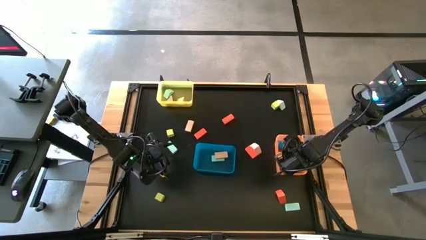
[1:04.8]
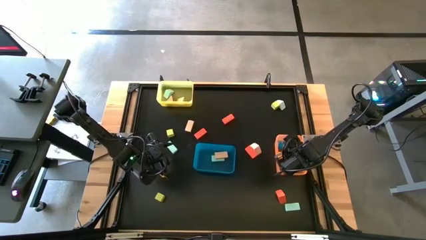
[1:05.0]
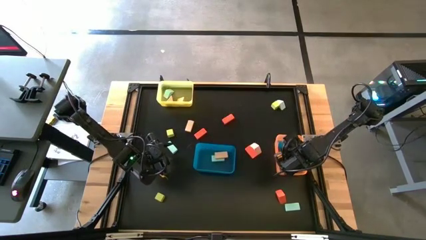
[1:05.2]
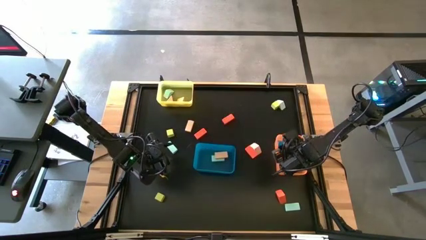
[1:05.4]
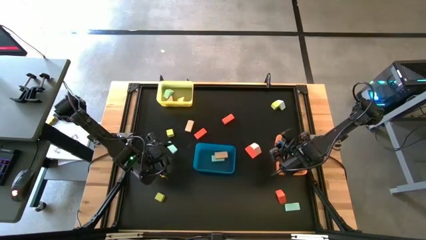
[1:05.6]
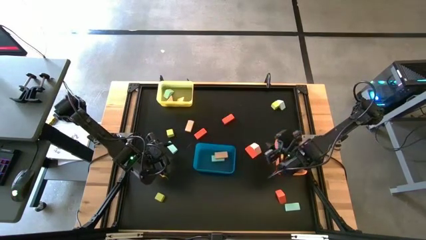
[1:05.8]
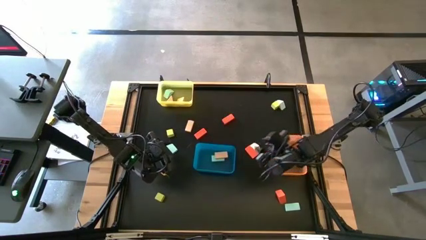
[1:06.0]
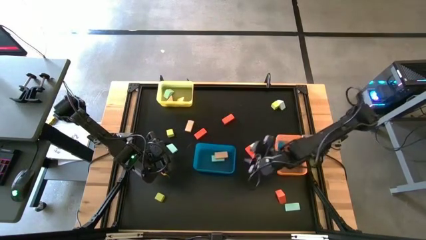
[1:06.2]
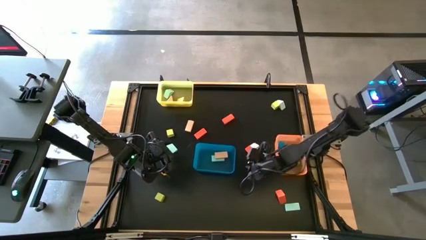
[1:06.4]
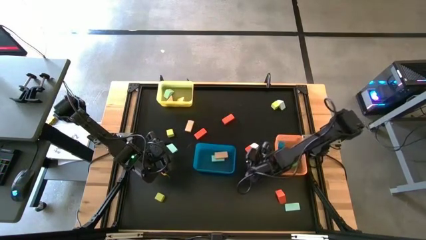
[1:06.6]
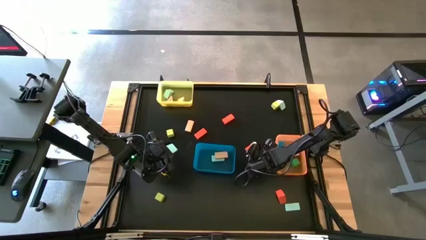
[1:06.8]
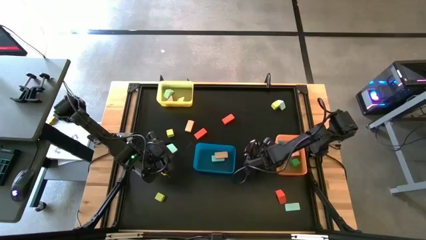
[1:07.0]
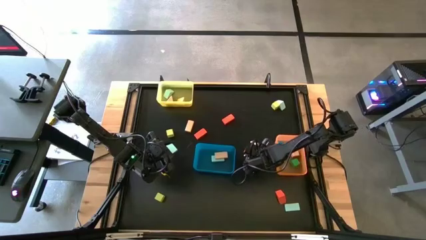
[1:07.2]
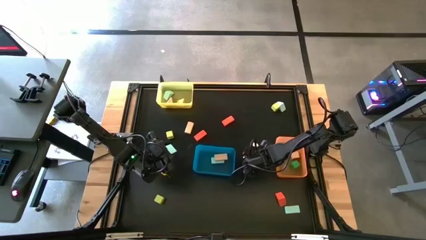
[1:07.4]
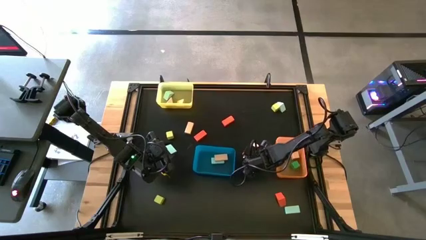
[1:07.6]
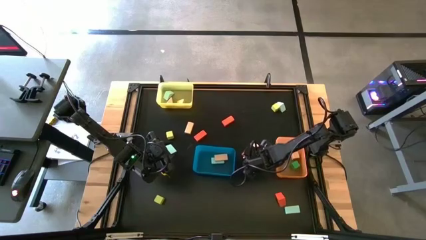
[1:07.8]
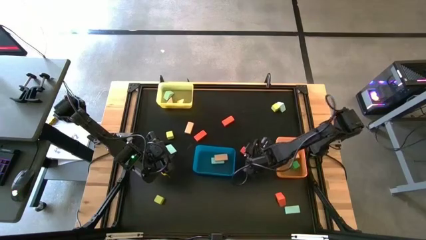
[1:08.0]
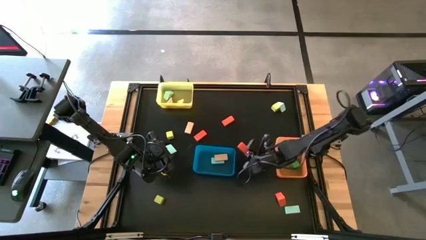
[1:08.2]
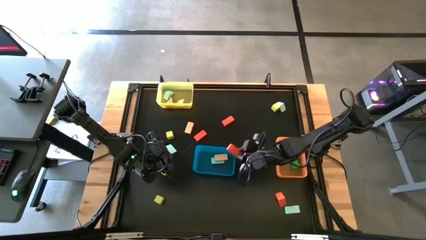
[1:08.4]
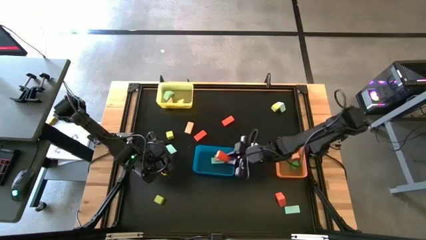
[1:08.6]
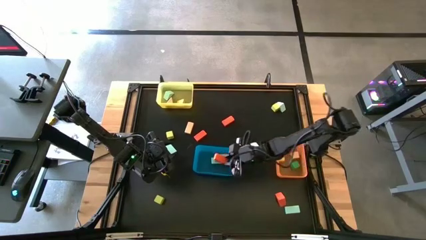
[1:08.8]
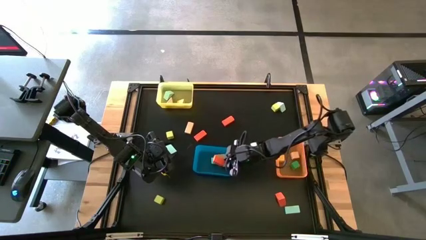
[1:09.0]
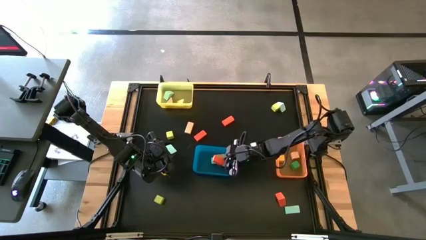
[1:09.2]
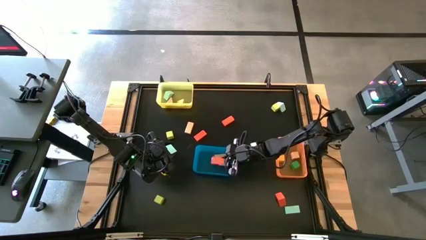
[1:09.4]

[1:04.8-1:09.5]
Task: Sort blocks by size
Put the orange rectangular block into the blue bin

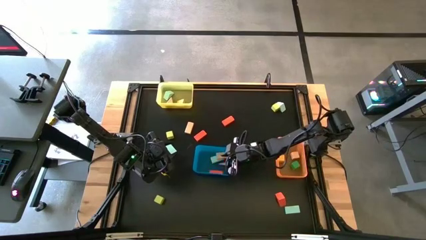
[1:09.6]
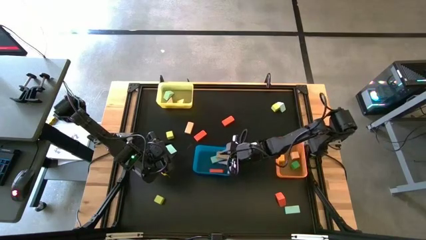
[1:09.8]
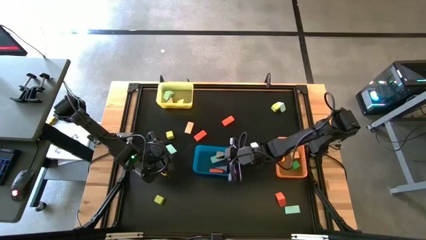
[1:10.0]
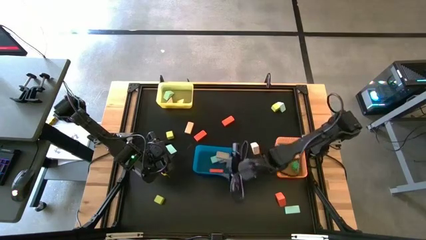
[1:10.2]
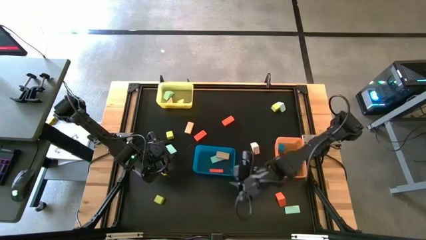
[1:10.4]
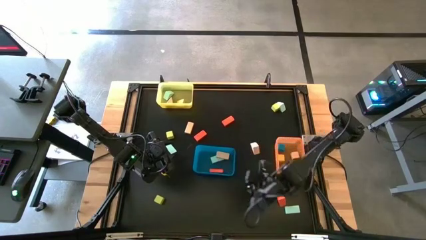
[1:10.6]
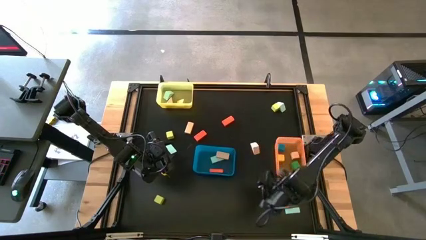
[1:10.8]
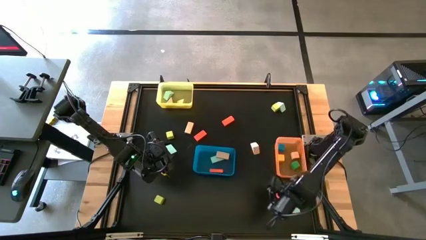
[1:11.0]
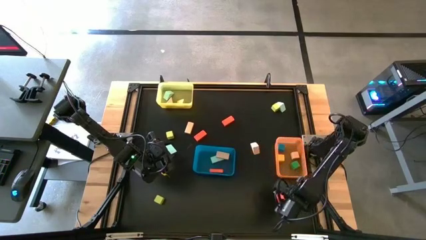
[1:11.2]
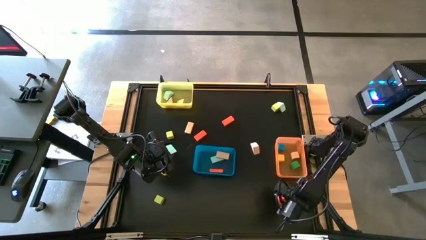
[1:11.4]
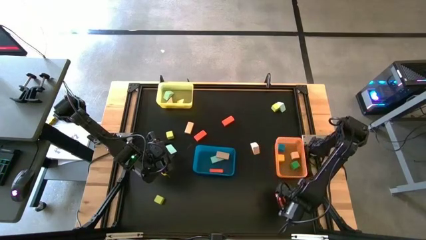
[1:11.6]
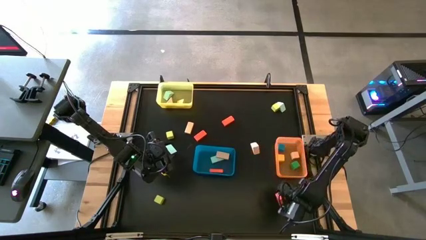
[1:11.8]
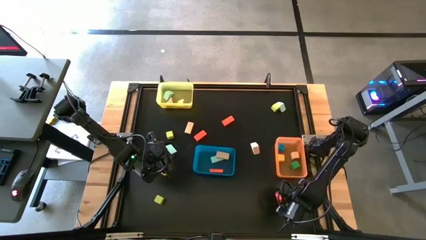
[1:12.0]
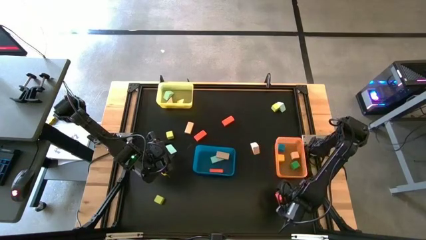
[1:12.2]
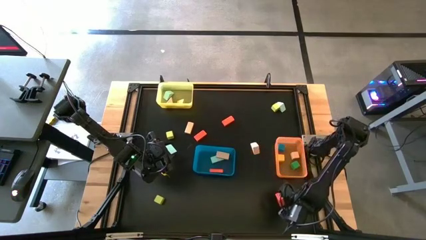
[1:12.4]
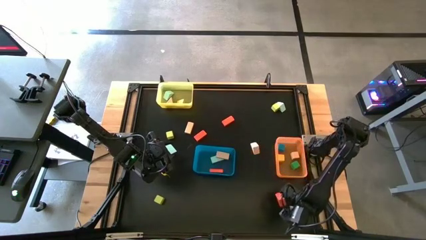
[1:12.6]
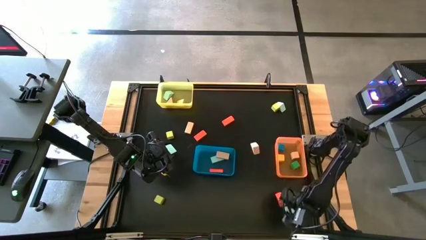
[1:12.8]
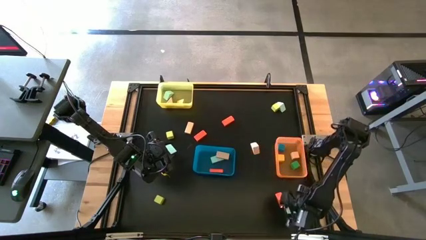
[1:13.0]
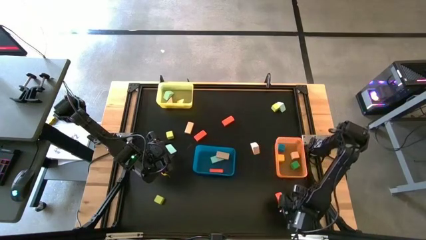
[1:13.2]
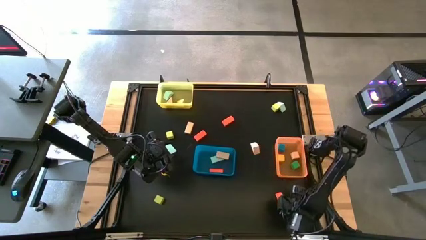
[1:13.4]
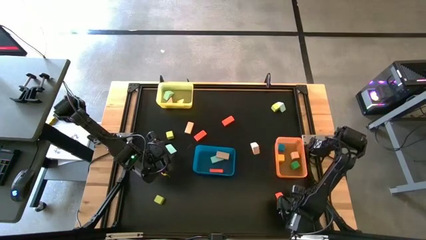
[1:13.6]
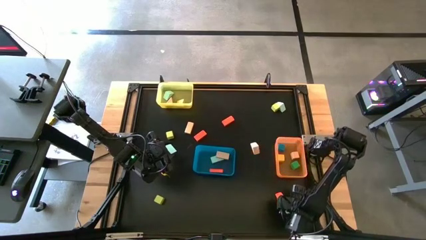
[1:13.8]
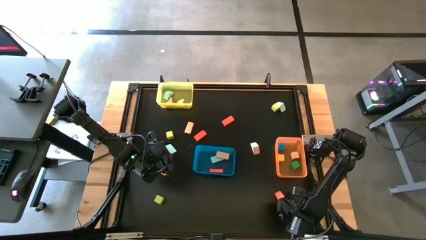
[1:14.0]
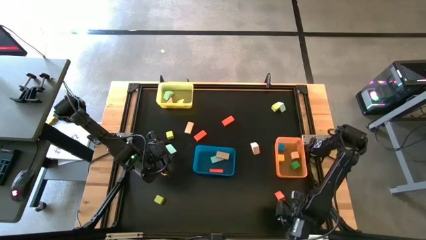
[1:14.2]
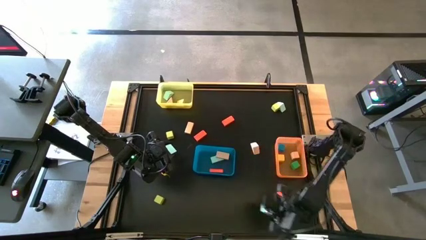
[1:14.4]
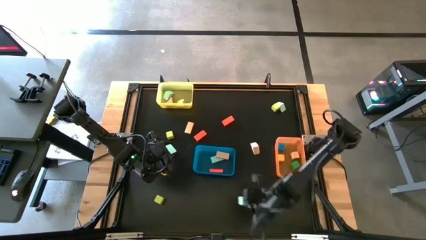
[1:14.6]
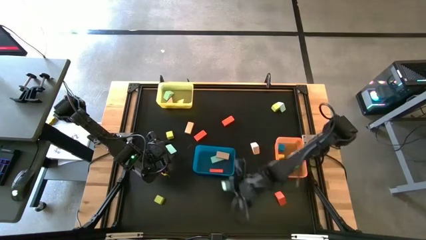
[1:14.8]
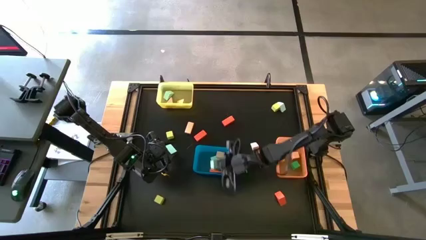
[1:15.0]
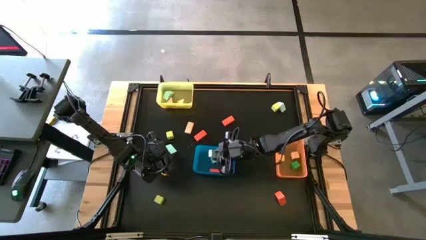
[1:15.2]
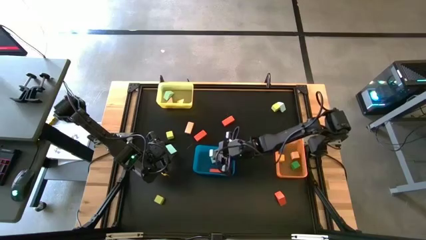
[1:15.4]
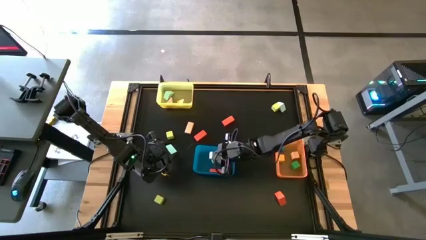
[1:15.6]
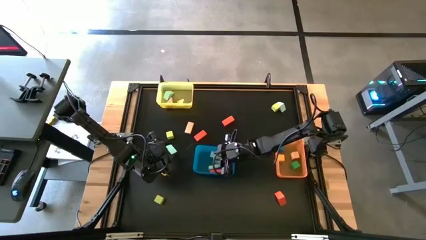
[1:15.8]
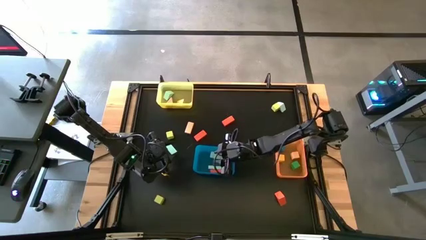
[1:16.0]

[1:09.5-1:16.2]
Put the light blue rectangular block into the blue bin

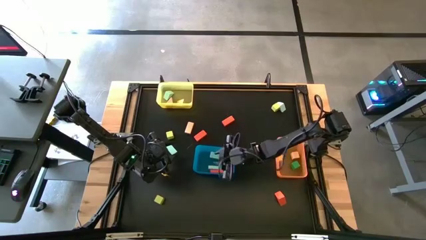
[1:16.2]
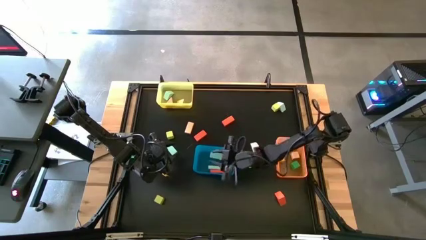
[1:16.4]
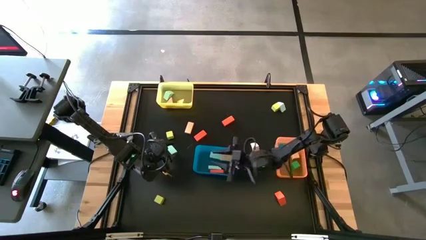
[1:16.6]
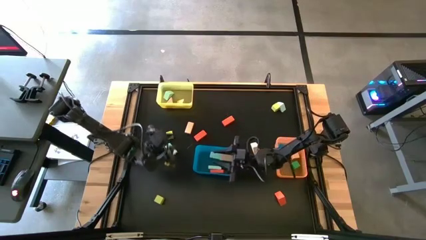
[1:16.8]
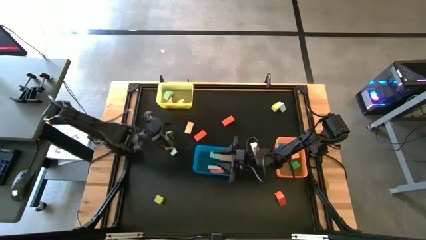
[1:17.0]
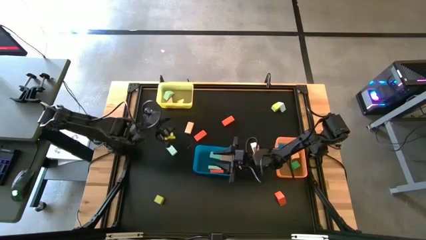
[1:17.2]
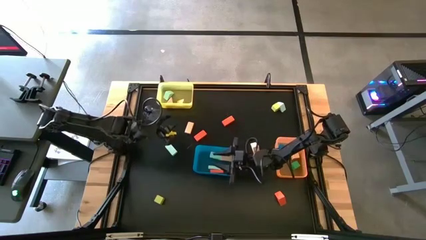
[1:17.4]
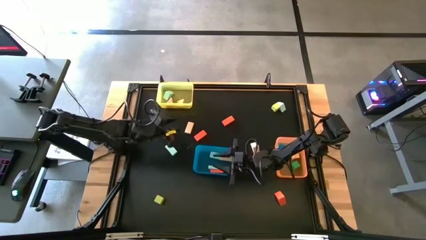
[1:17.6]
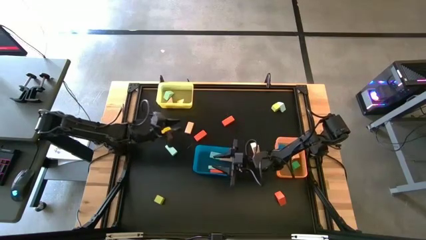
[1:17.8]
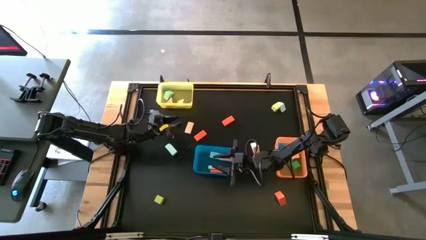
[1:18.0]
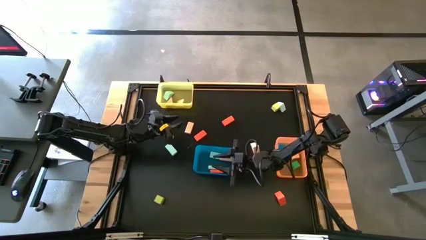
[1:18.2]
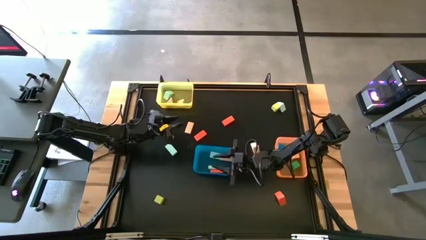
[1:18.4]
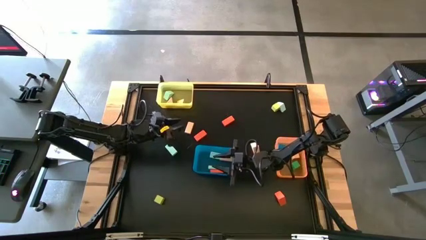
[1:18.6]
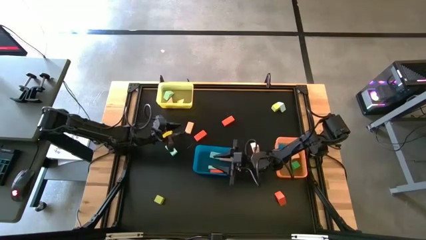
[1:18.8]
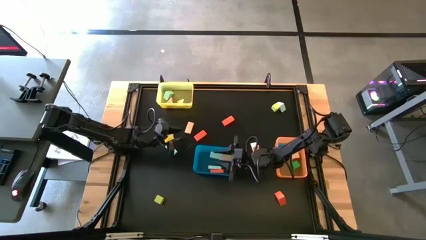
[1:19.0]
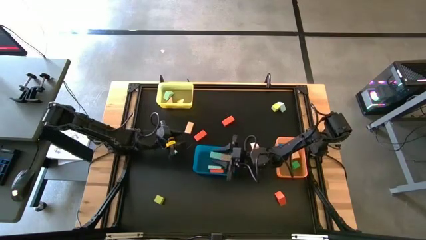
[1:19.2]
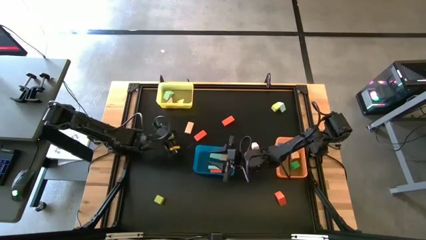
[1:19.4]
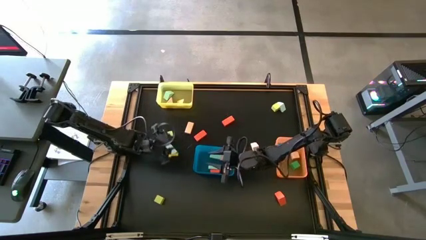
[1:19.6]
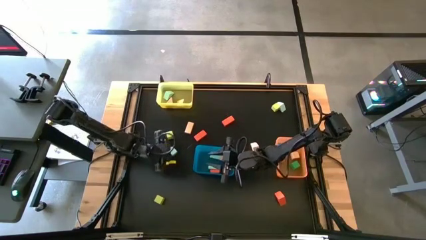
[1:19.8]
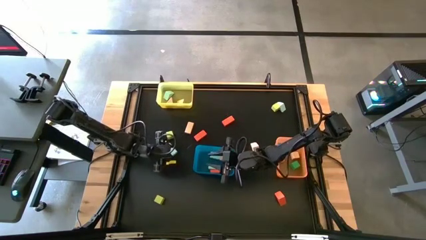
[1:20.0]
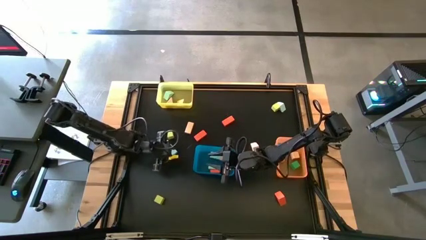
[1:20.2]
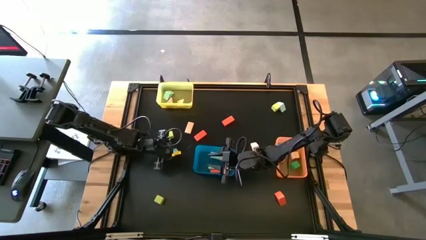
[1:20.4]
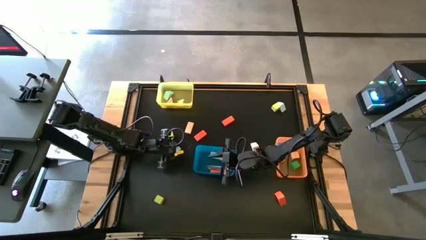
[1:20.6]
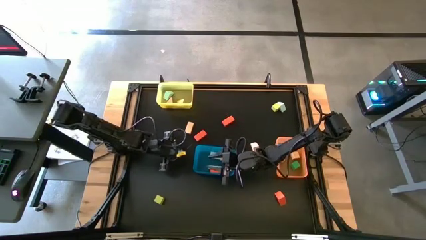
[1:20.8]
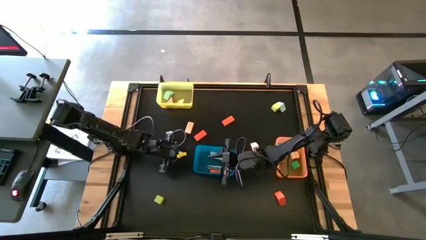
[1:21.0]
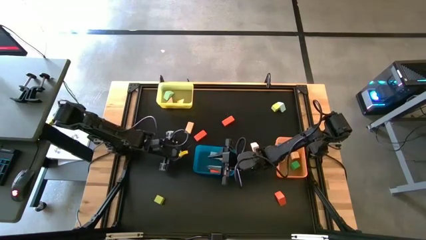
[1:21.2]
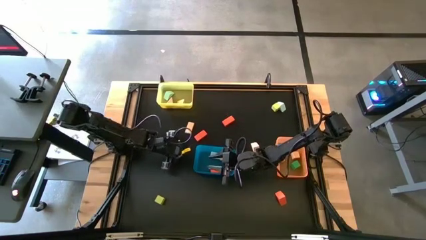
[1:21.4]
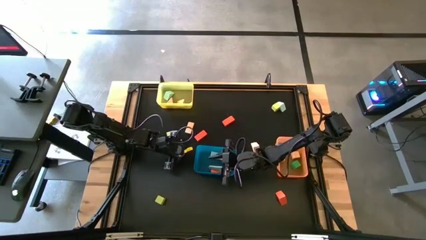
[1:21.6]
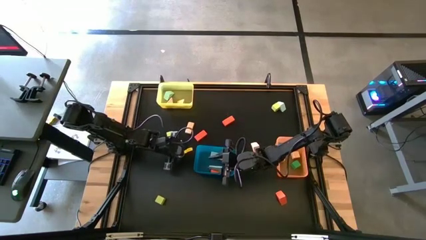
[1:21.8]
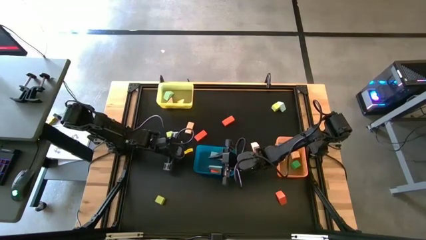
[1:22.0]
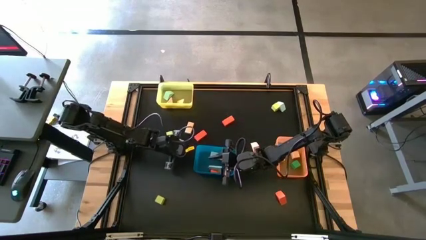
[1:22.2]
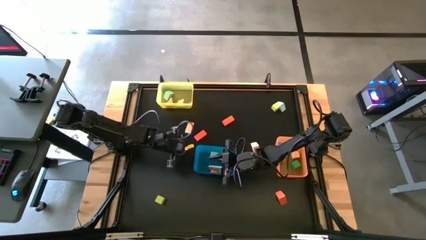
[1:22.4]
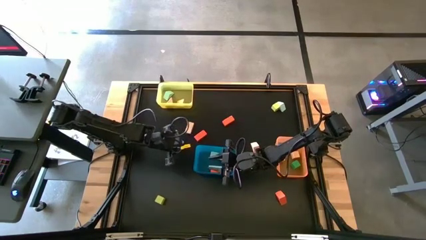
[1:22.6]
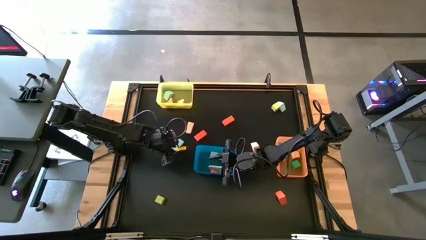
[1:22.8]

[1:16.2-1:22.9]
Put the light blue rectangular block into the blue bin
